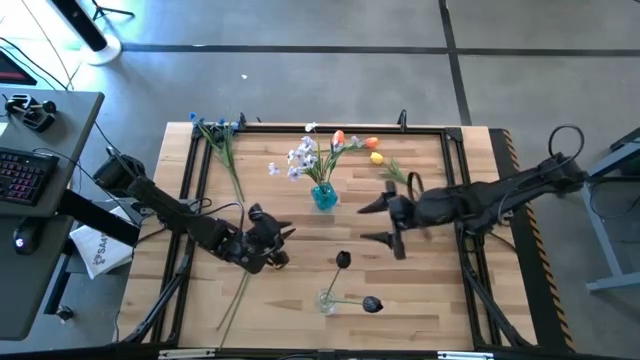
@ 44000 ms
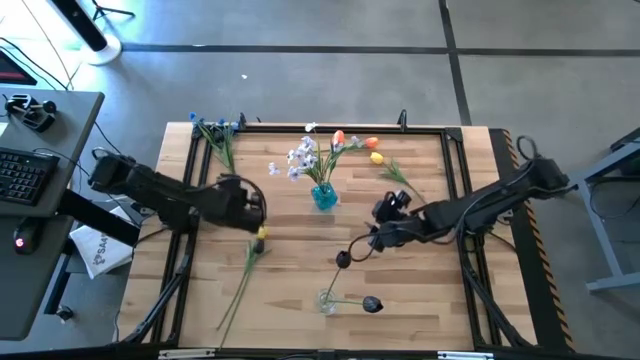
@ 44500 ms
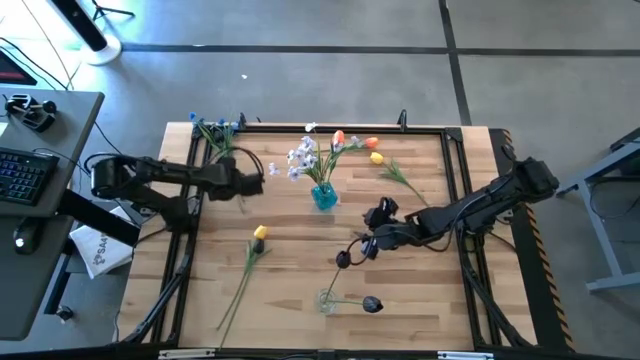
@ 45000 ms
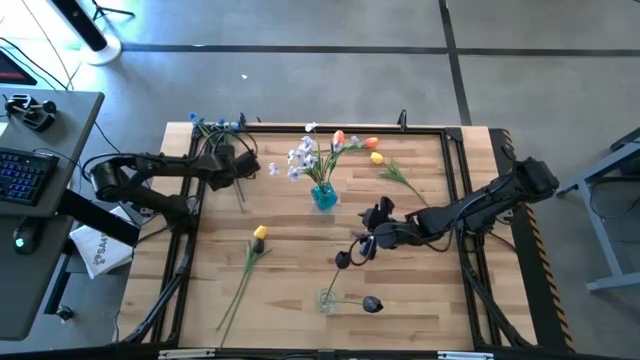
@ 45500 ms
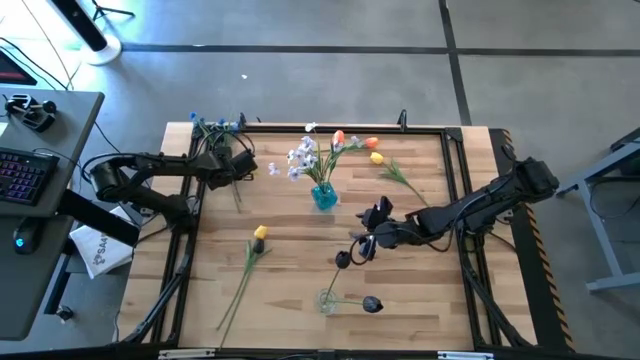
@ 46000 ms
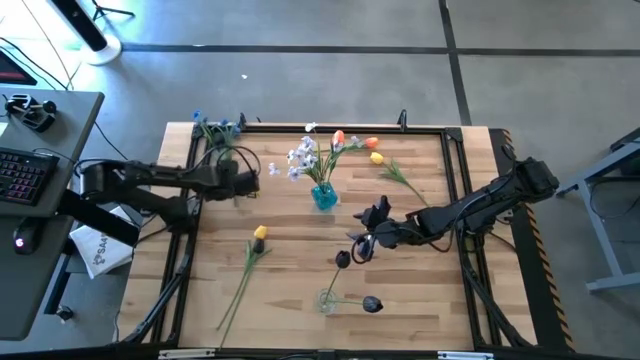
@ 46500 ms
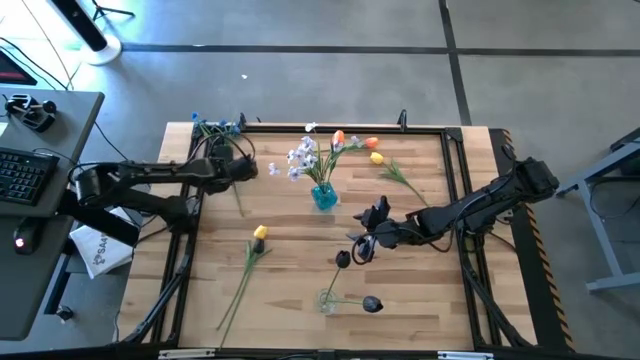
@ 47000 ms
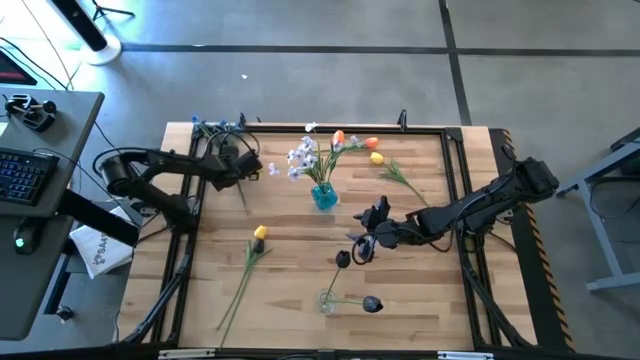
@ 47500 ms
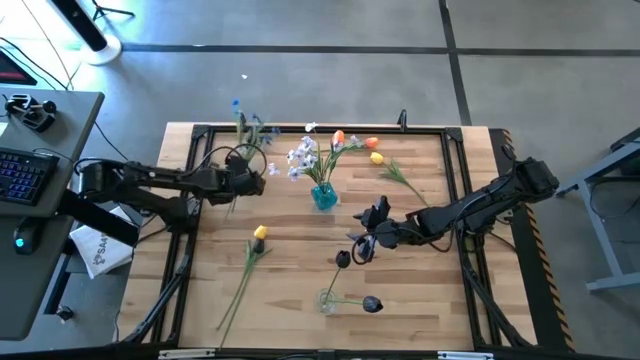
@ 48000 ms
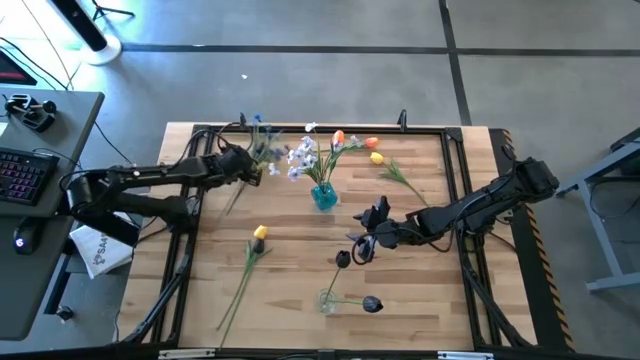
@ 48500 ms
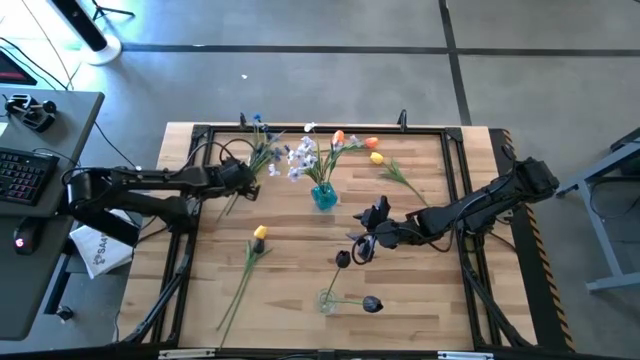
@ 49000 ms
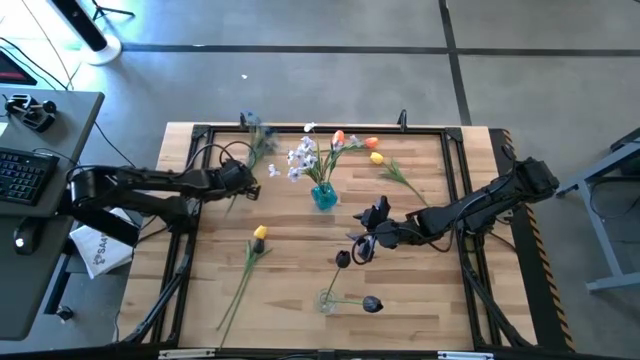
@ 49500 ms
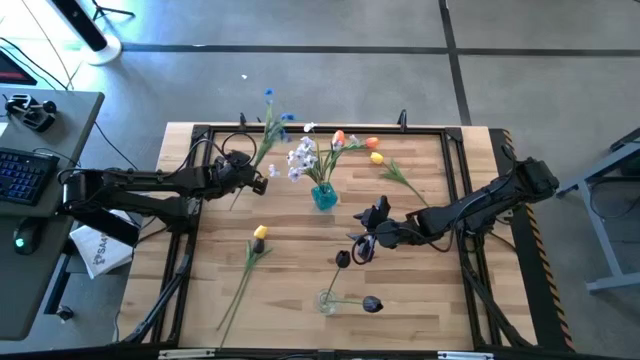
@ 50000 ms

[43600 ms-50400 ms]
Task: Sort flowers into vase by color
Put the blue flowers into the transparent vase

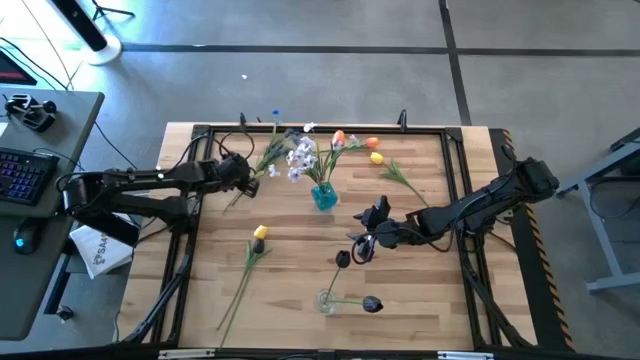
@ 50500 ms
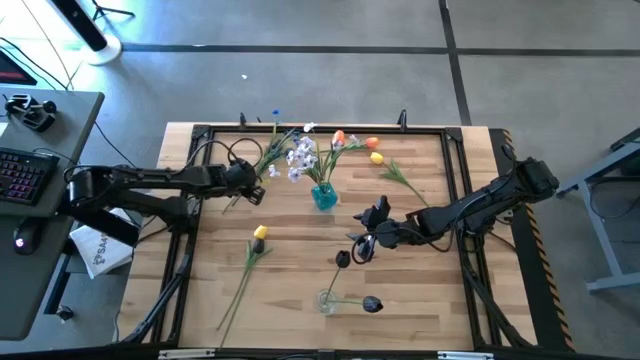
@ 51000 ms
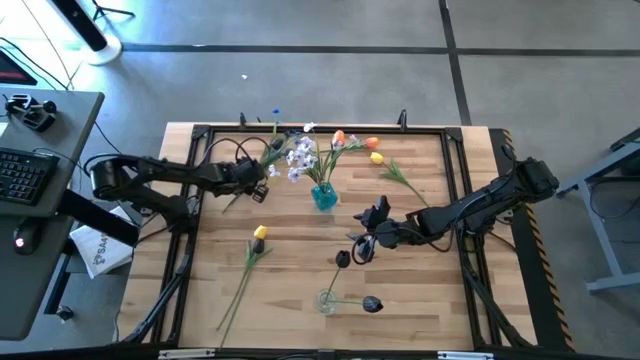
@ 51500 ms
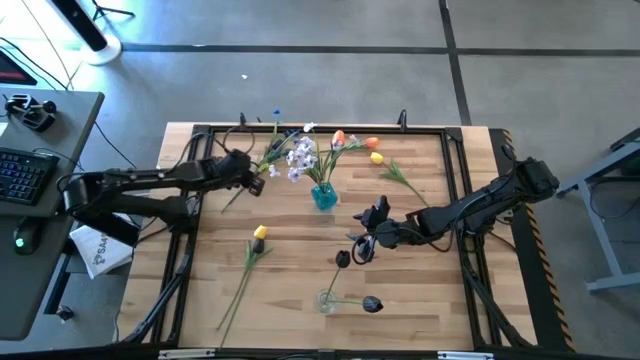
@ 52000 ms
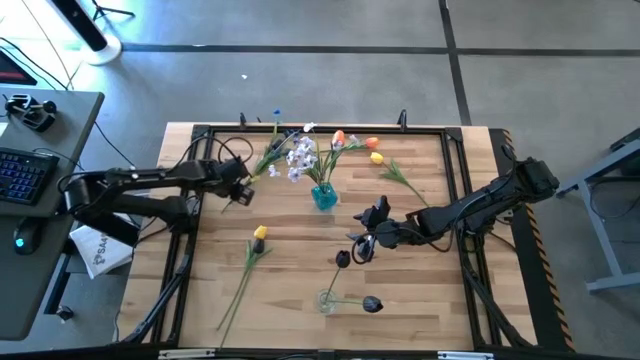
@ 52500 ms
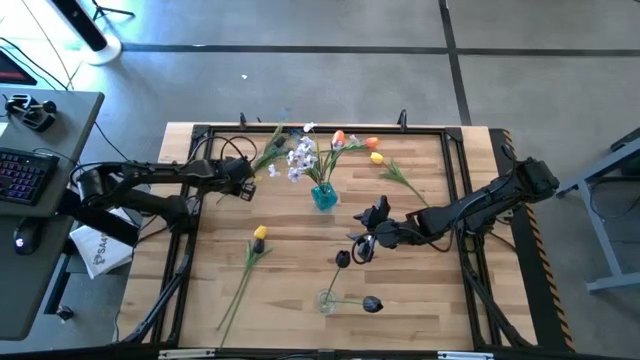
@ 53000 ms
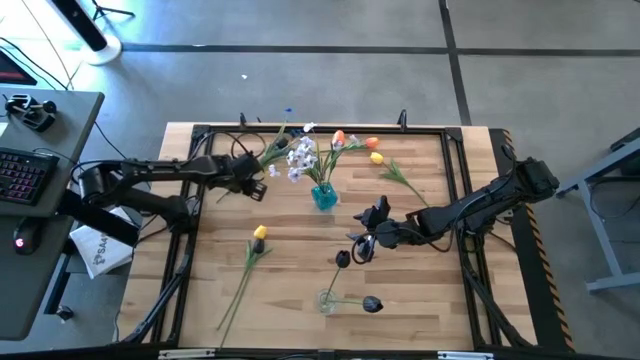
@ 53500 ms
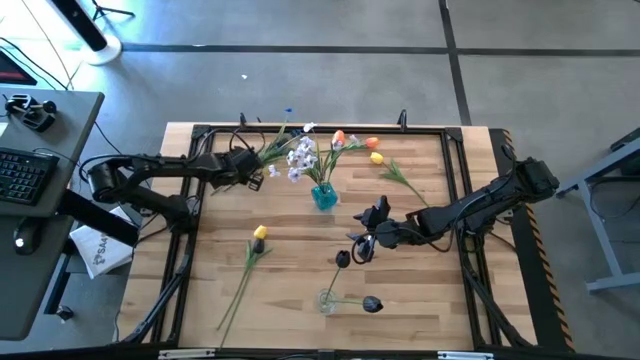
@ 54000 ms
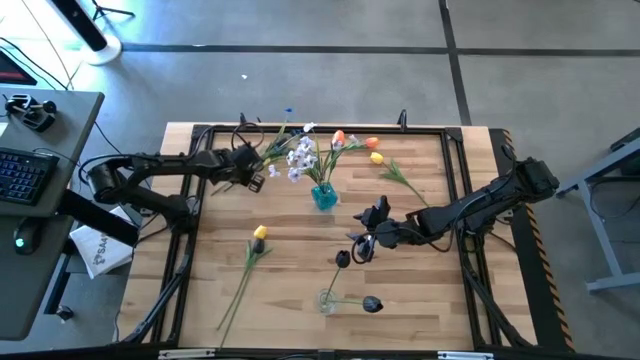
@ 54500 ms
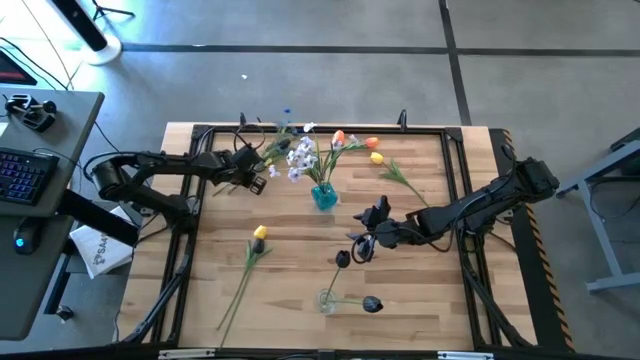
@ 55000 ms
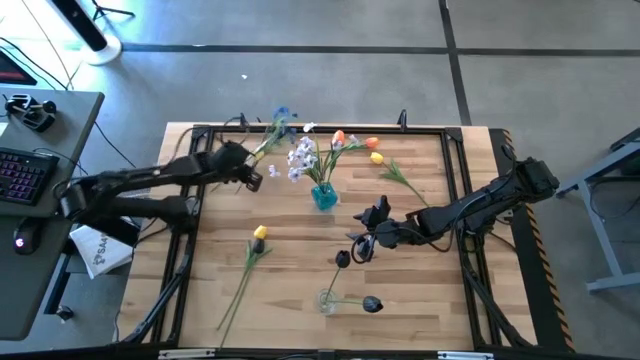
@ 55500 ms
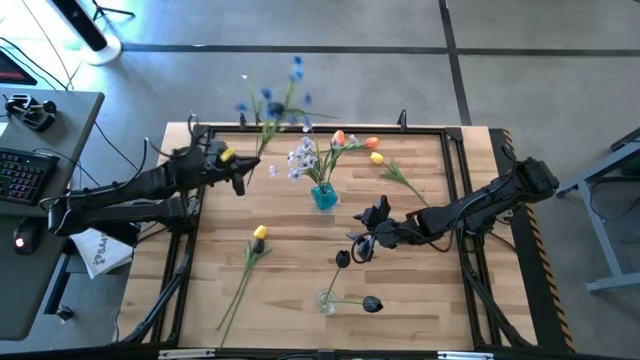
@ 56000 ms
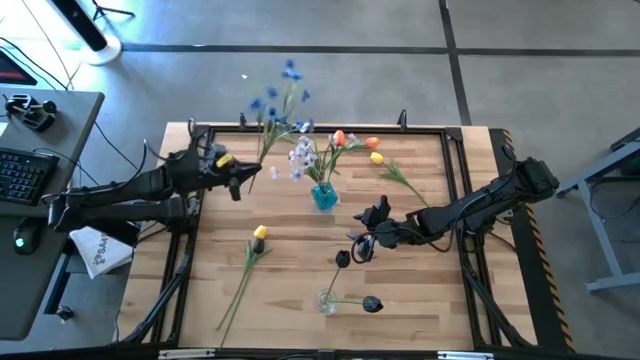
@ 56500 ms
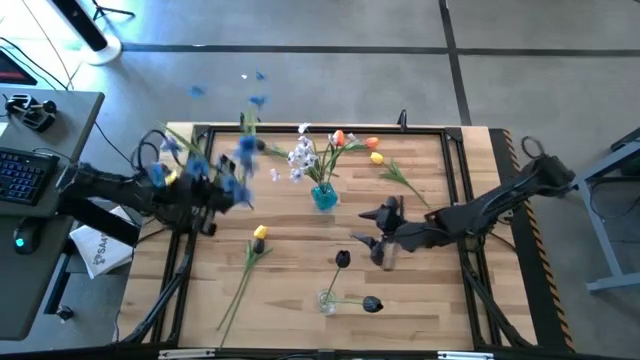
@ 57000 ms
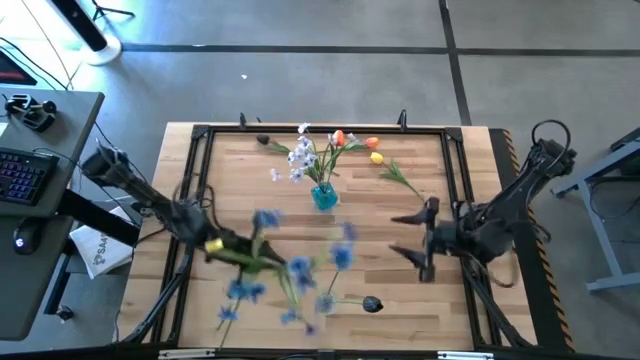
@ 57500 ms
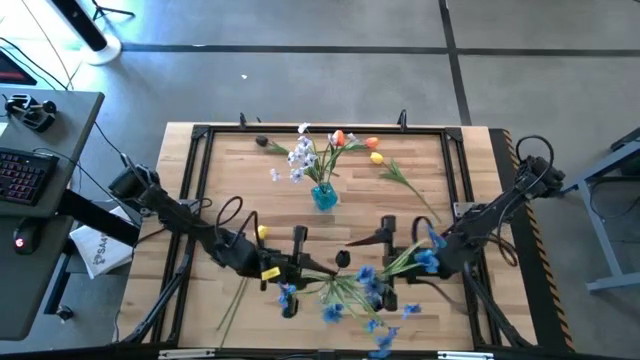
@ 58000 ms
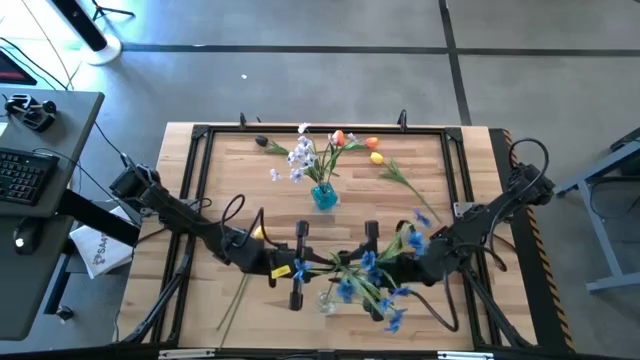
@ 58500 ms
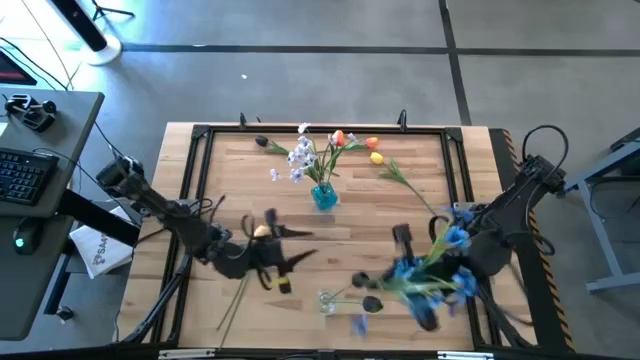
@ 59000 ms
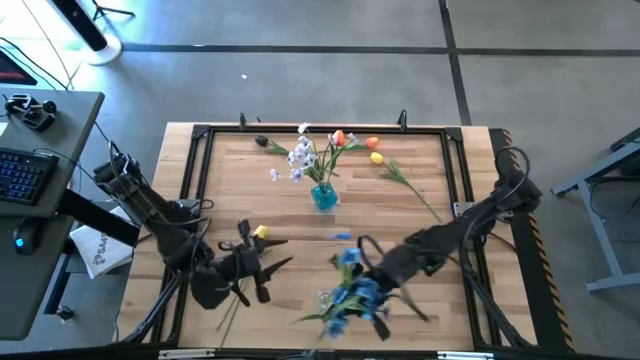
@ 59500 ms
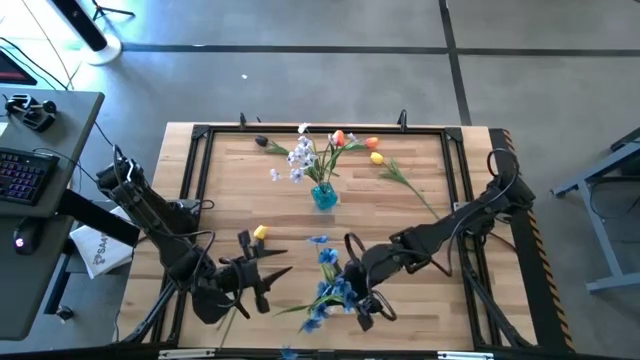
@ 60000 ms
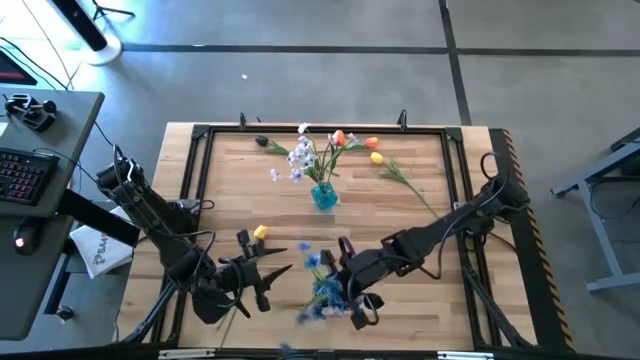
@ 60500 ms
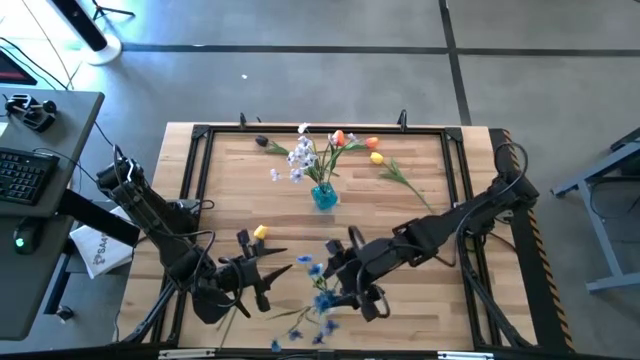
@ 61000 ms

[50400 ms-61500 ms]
Put the blue flowers into the transparent vase

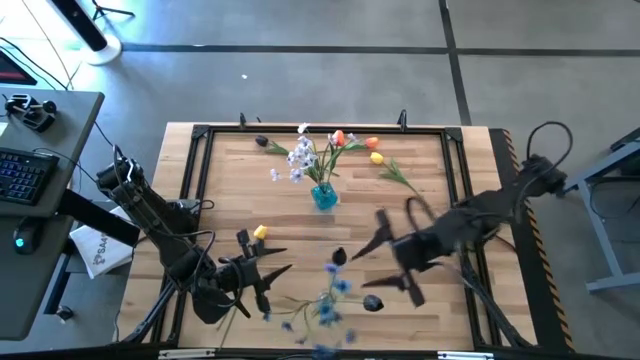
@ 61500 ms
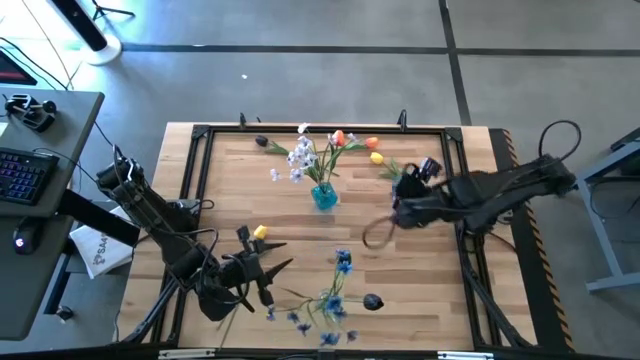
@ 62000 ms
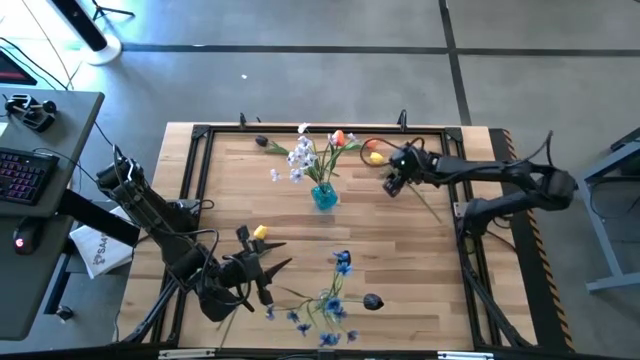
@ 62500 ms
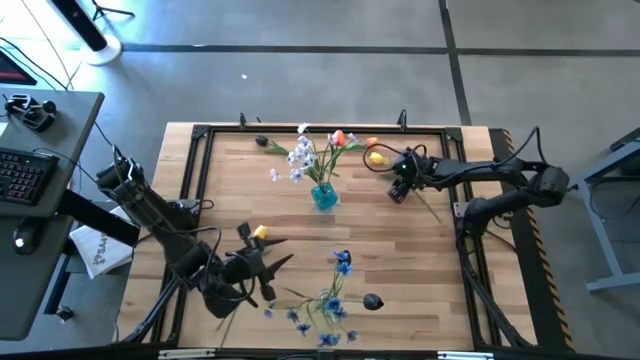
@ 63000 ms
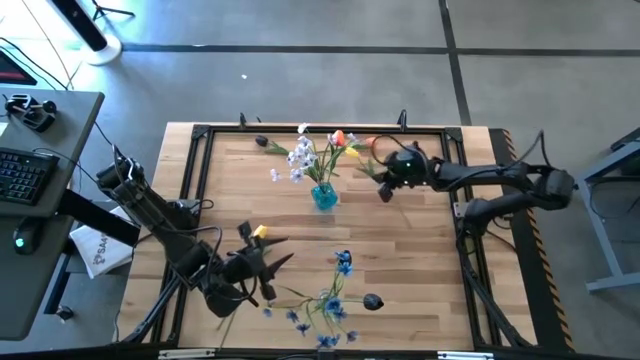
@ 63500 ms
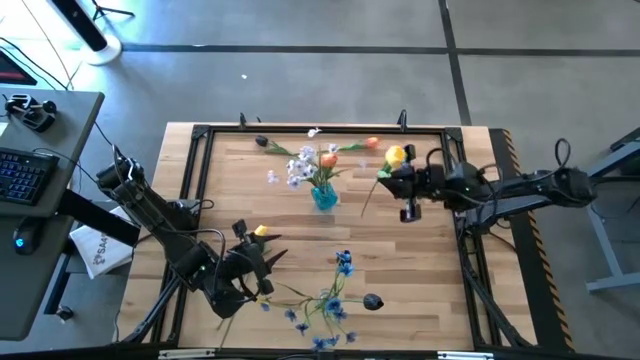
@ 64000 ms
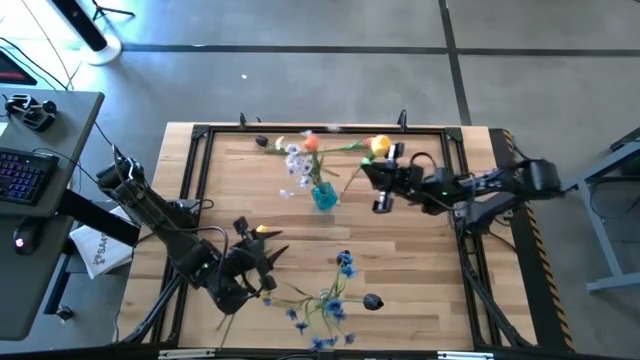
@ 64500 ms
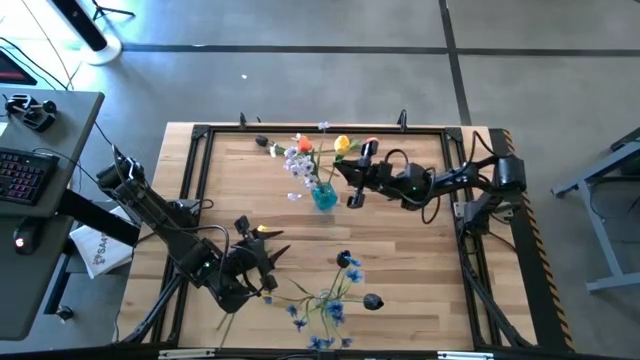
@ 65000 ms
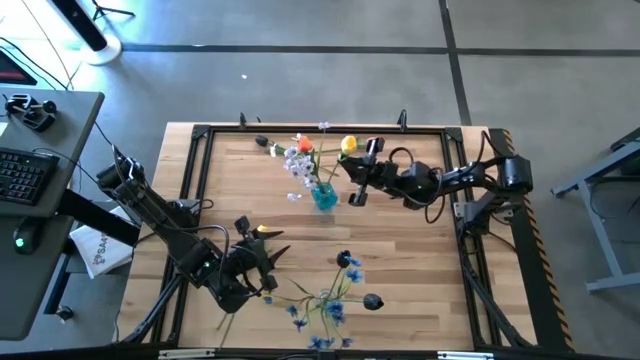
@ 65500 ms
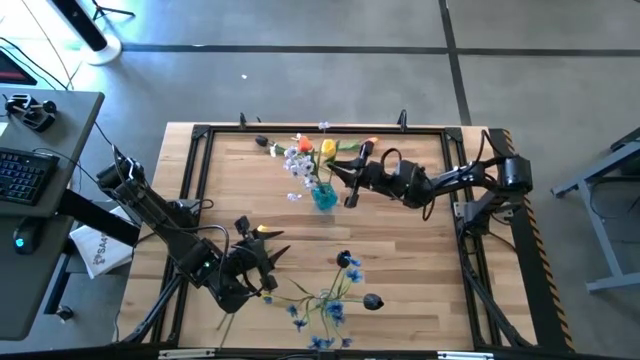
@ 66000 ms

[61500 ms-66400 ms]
Put the top yellow tulip into the blue vase
